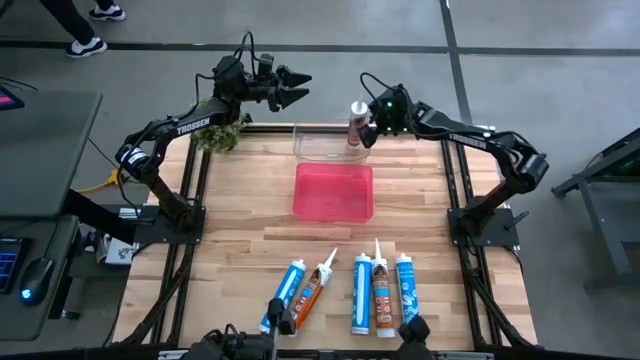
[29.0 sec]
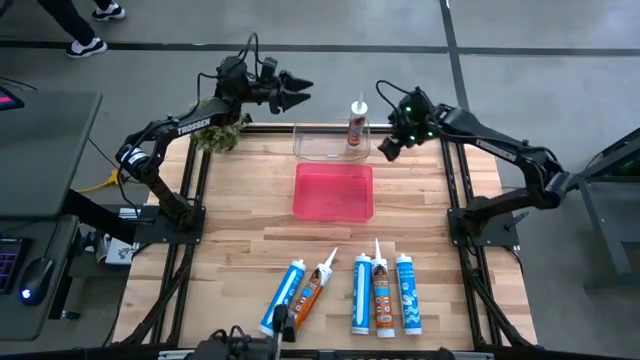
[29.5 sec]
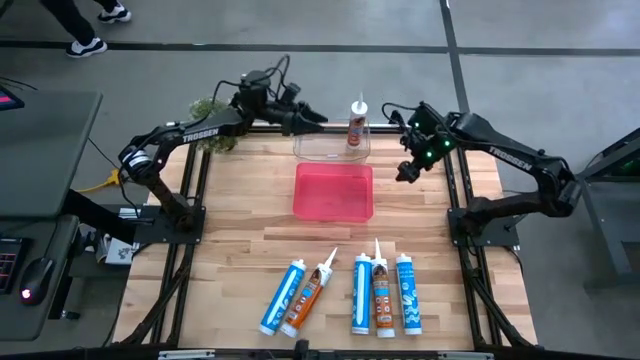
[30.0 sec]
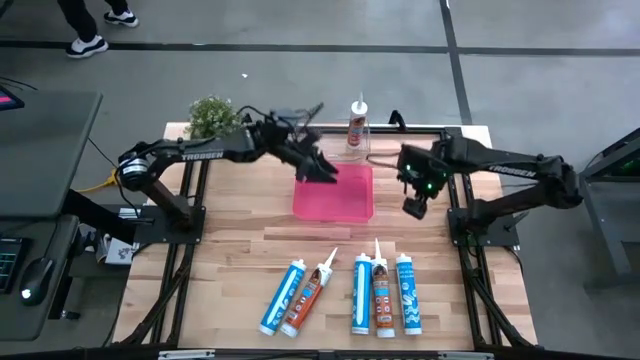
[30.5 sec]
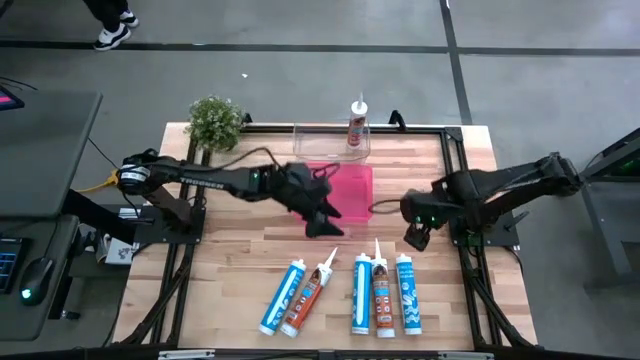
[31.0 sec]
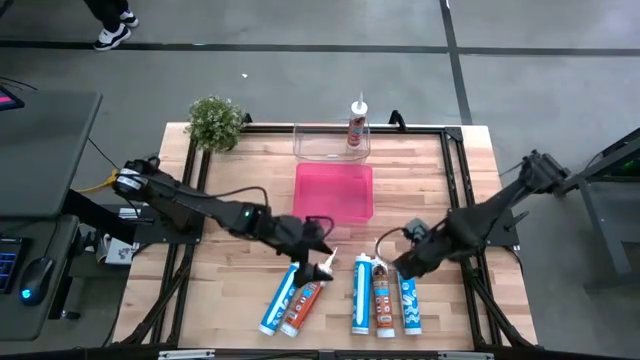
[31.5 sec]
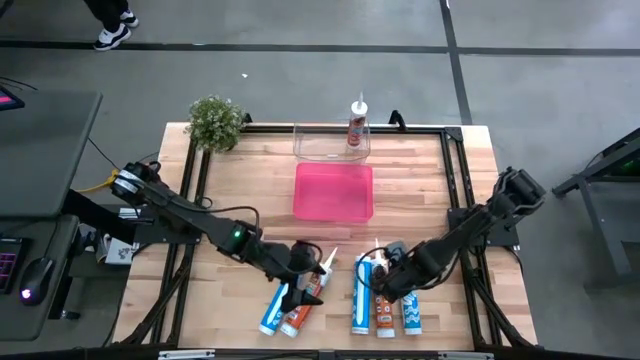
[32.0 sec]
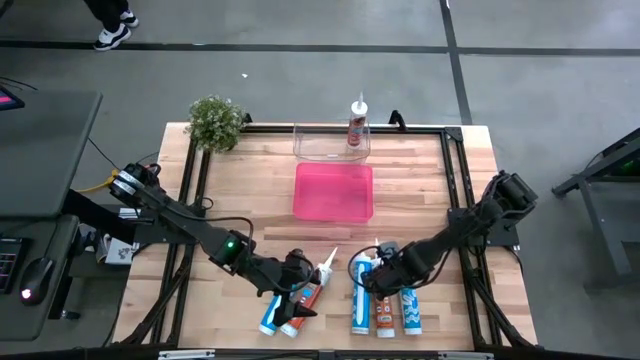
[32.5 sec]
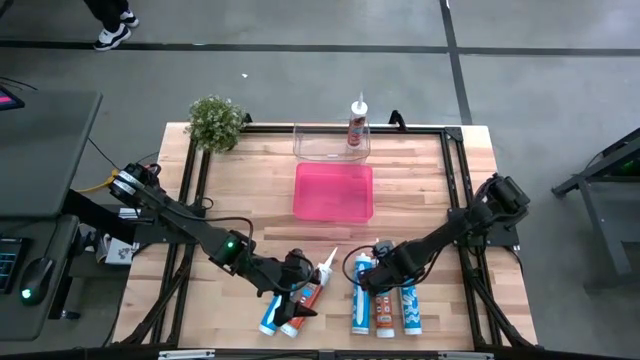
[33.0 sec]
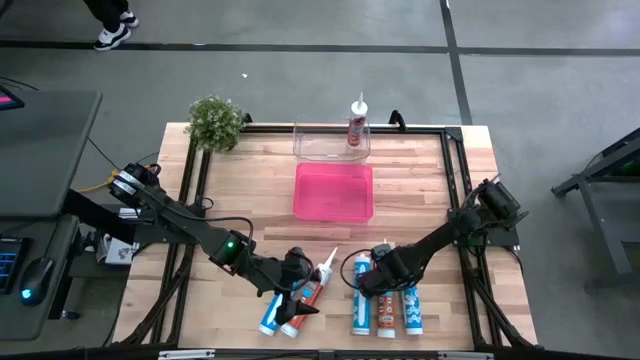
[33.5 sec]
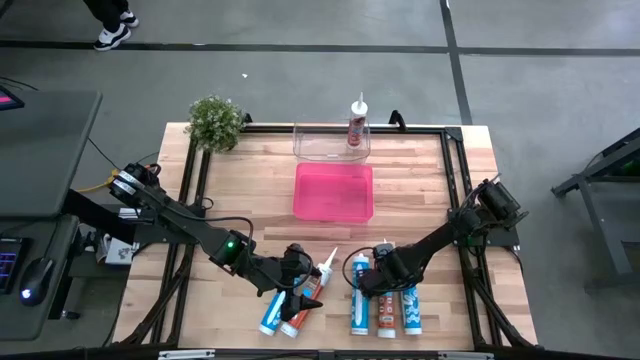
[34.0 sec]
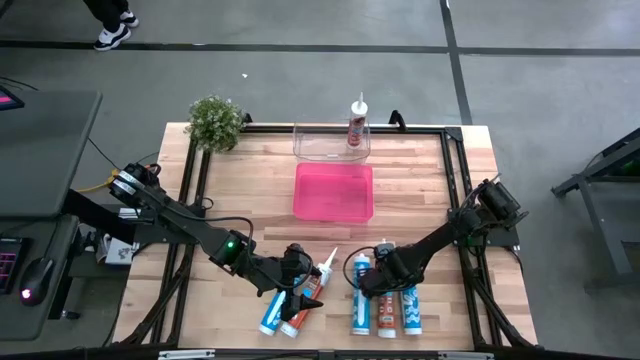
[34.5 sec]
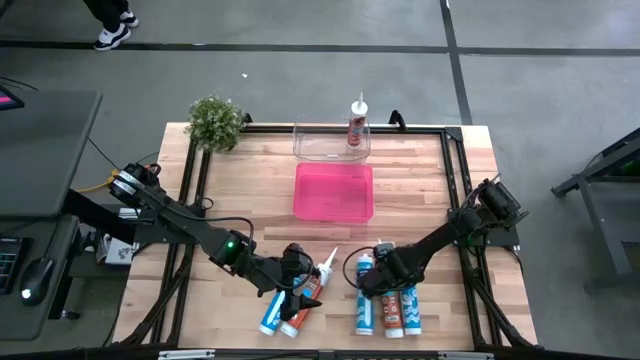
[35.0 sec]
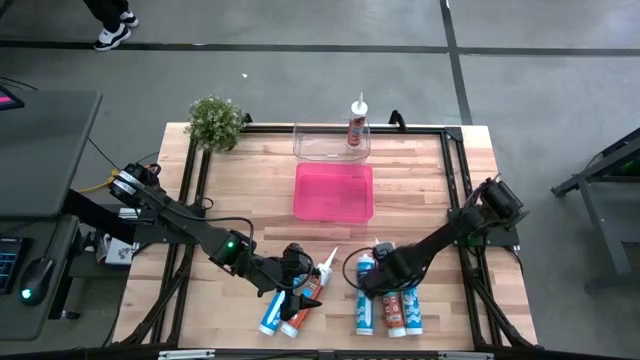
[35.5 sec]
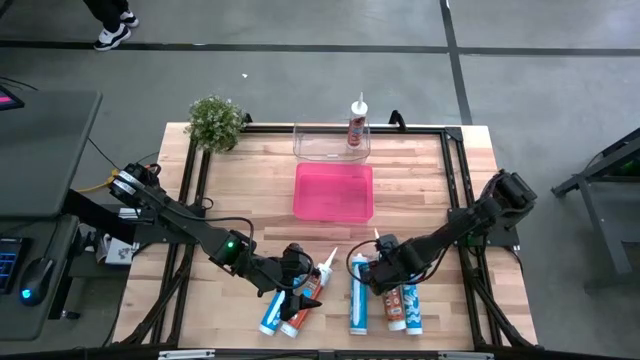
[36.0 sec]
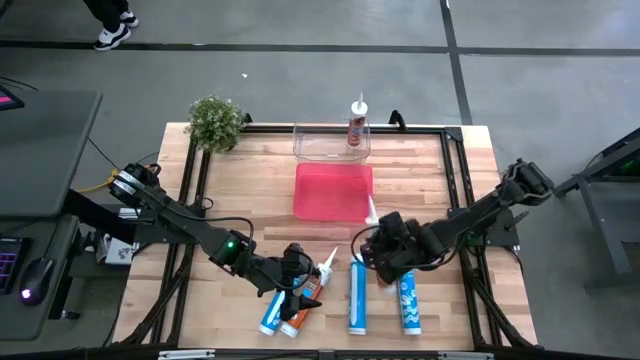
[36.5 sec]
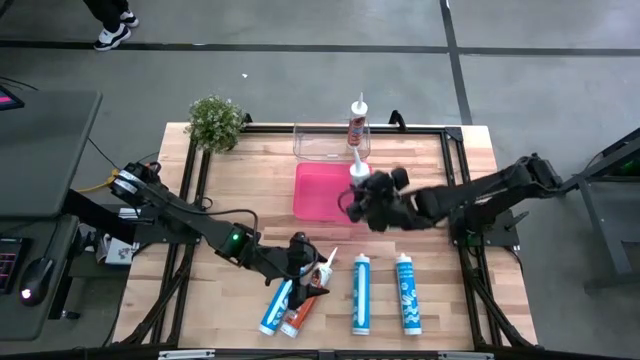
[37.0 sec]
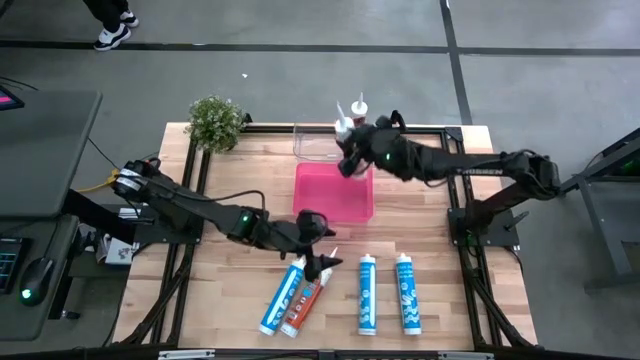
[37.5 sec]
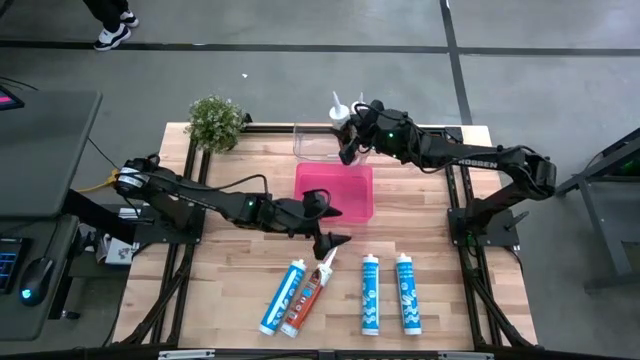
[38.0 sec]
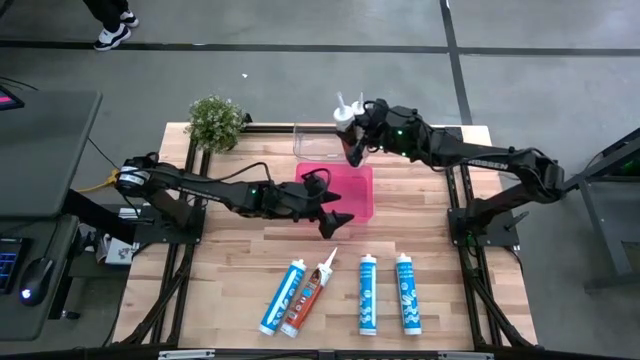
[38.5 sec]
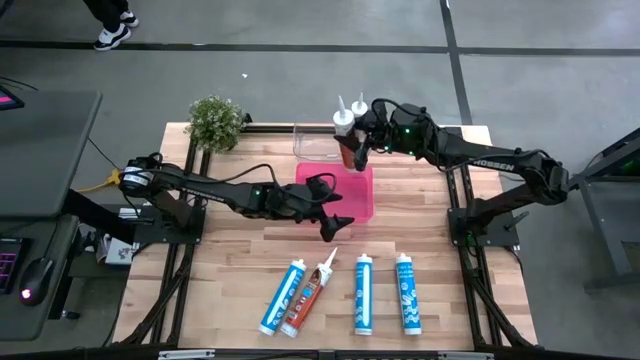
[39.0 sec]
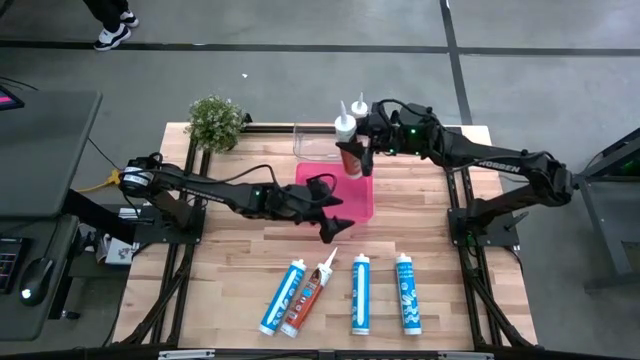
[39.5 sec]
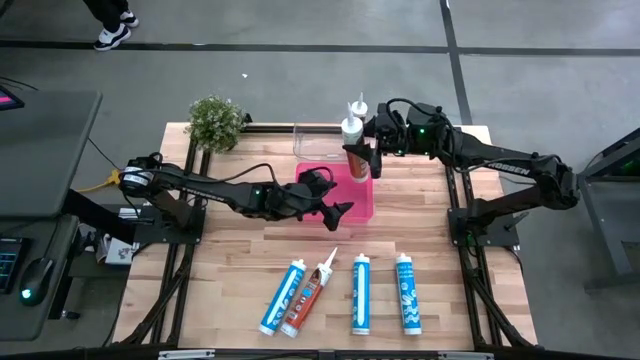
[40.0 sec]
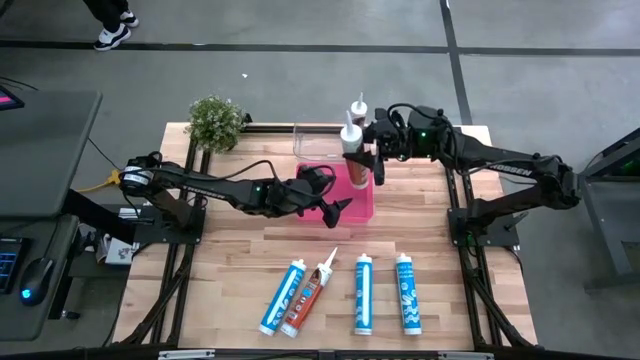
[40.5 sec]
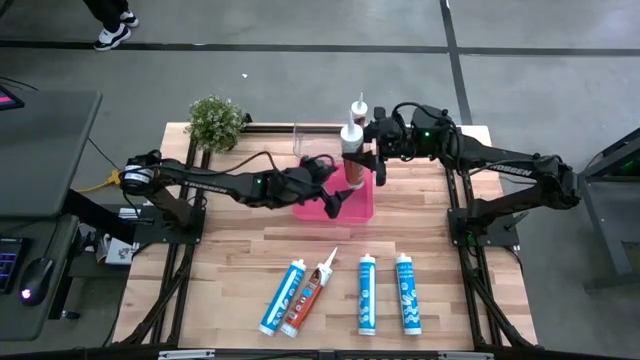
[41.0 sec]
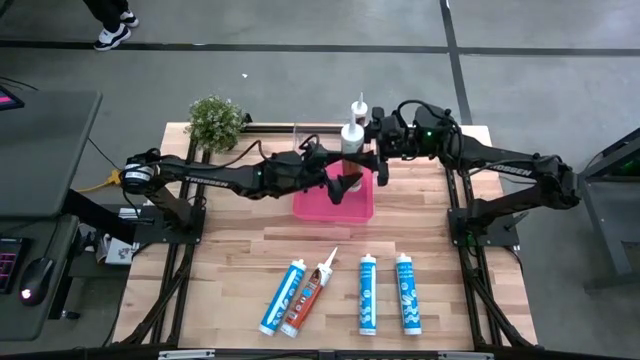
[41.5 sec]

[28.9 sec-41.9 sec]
Task: Pick & place silicon tubes, Sealant and Lysol wipes
Put the right orange sealant into the transparent container

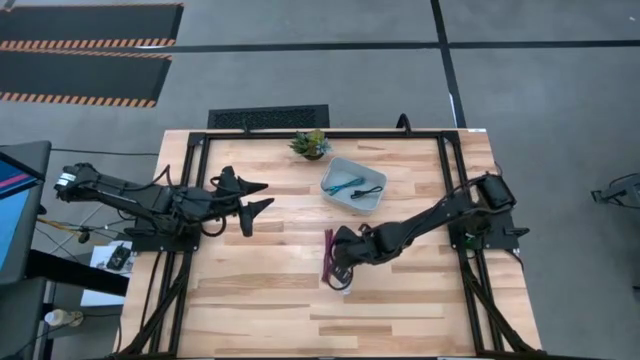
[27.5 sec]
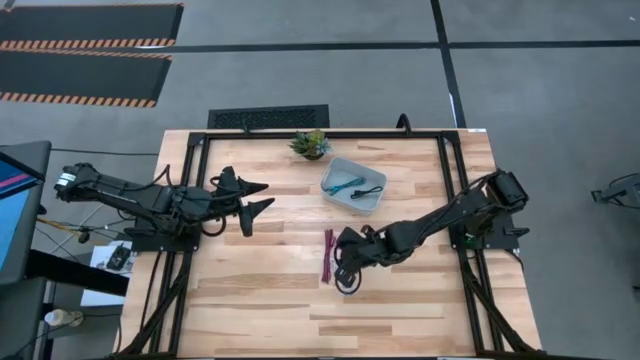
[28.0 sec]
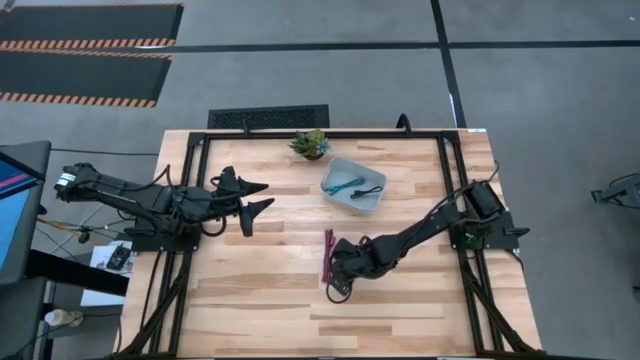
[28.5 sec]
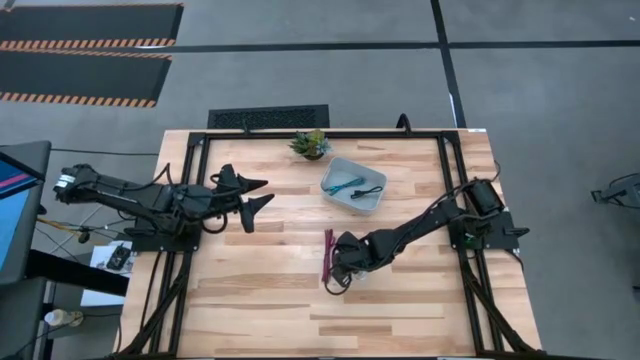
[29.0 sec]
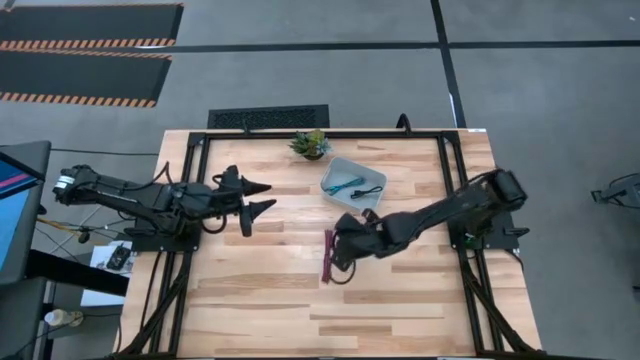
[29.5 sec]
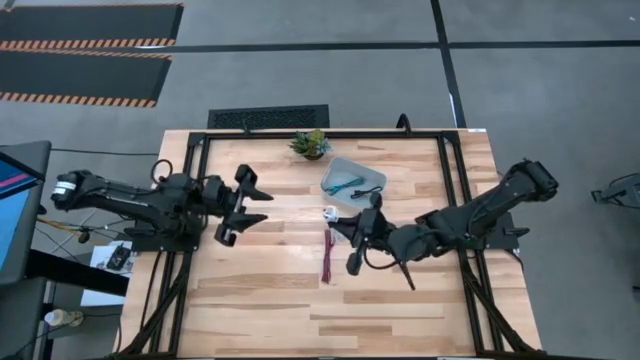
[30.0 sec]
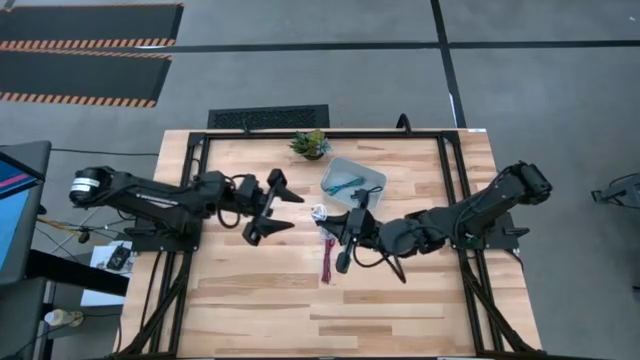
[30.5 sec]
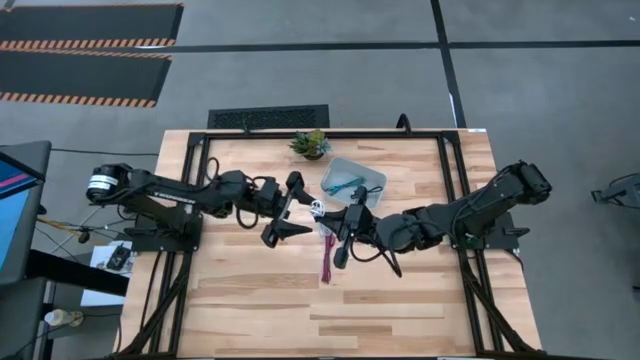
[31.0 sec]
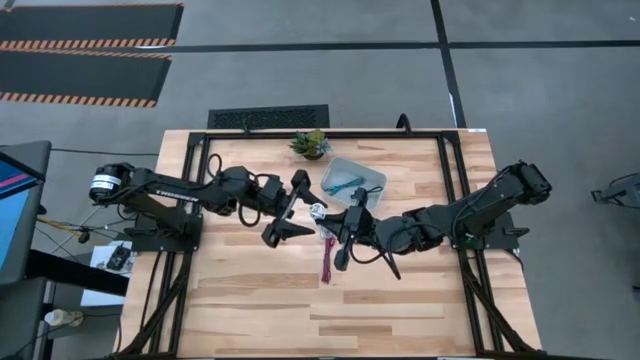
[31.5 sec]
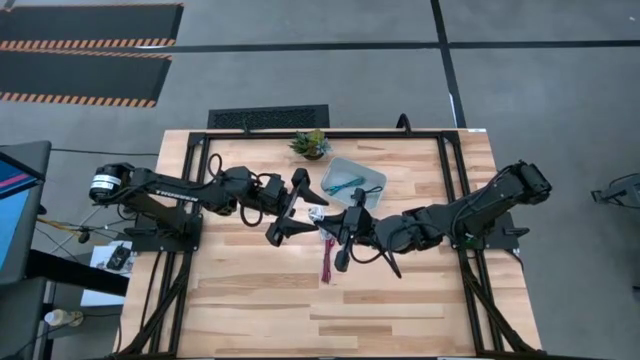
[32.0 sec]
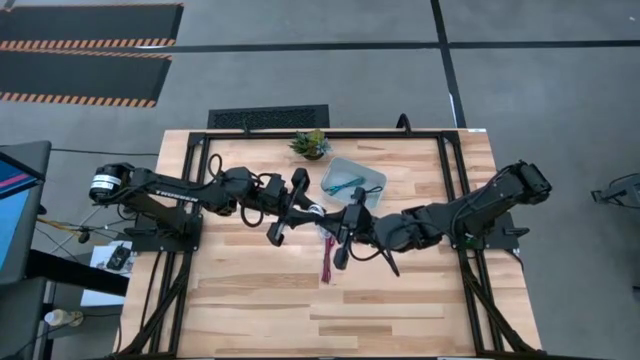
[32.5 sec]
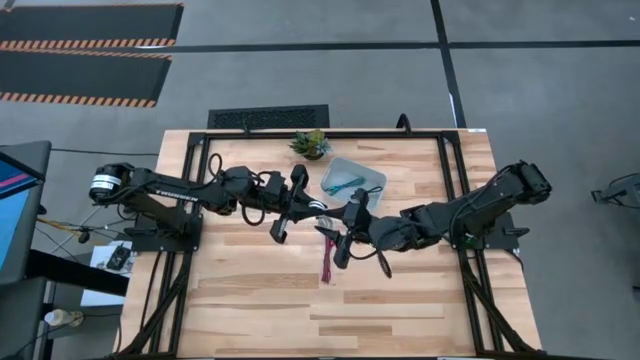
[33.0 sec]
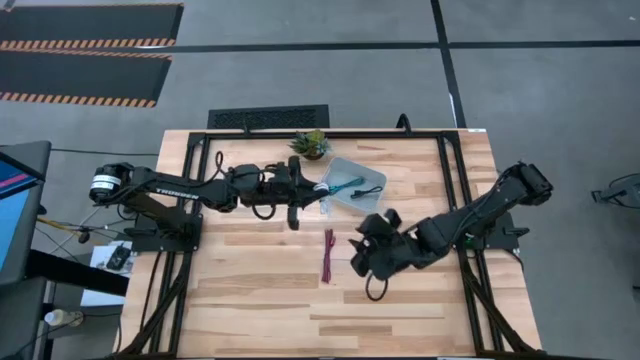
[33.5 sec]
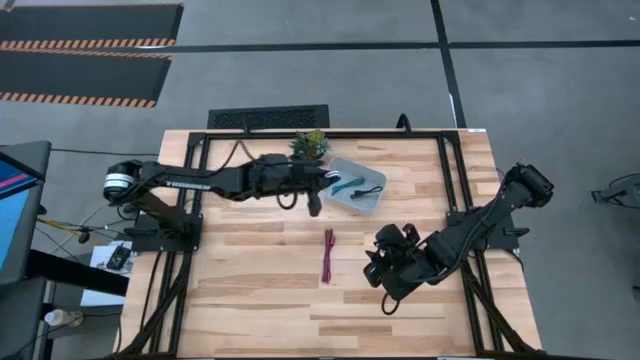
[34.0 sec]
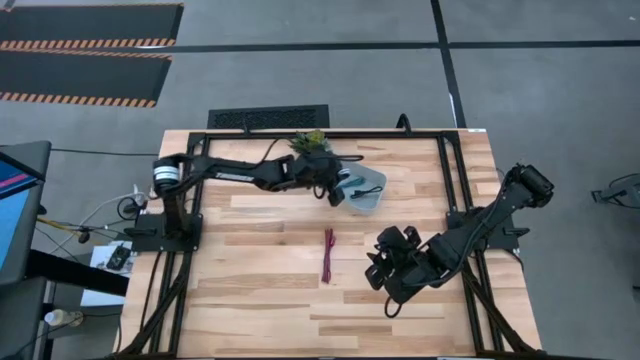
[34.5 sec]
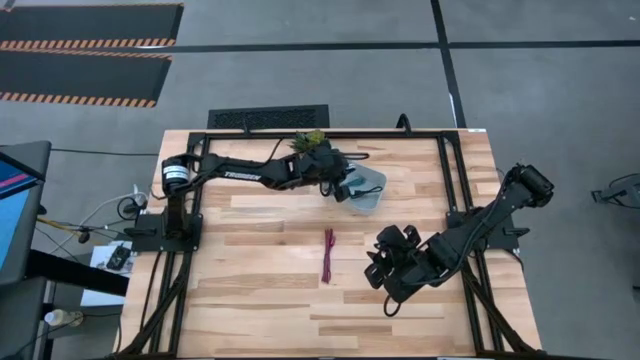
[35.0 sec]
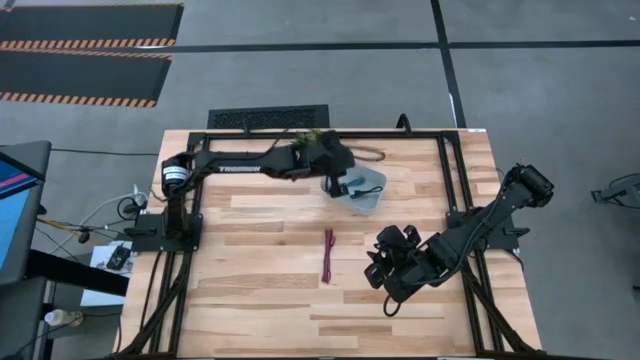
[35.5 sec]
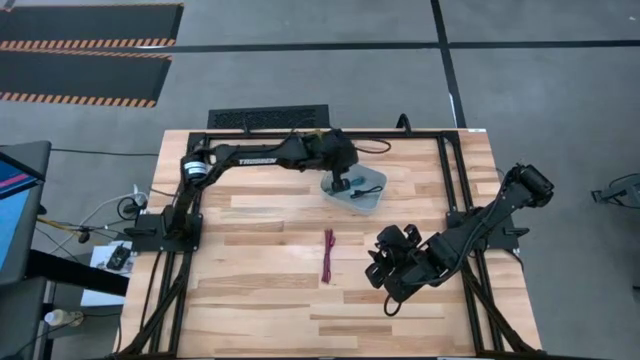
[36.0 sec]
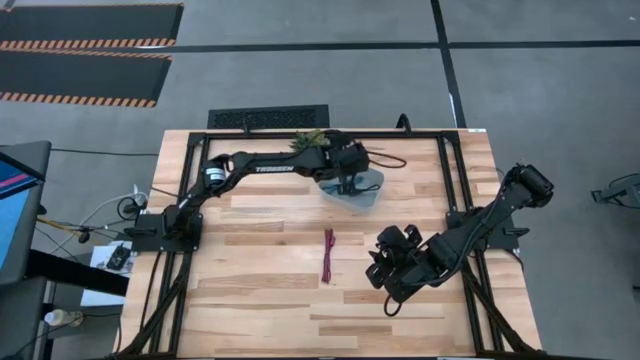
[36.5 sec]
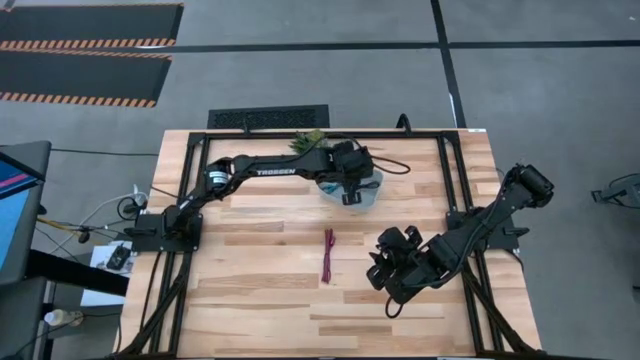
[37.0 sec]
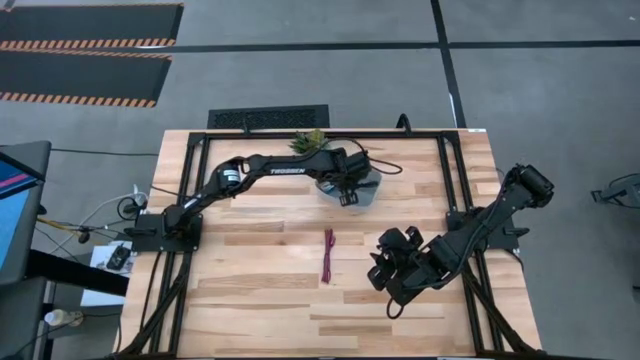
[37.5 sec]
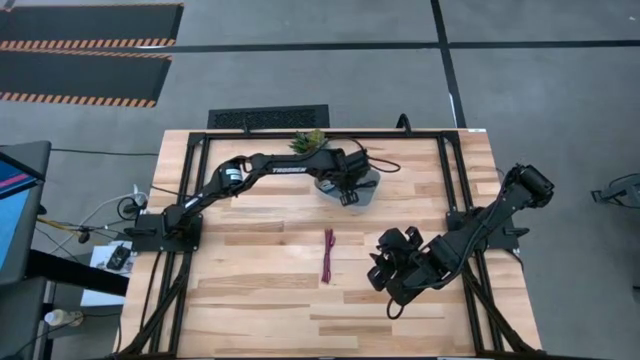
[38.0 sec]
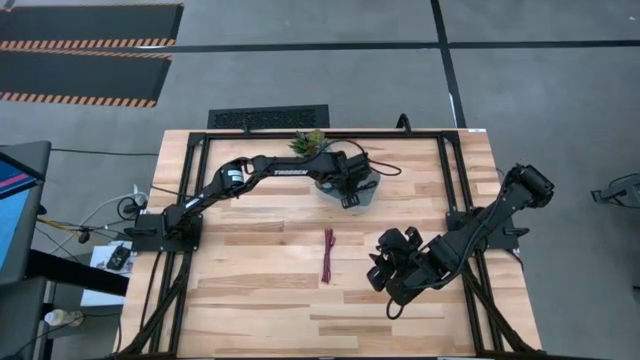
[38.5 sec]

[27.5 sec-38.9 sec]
Task: Pick and place USB-C Cables
Put the white charger cable into the white bin
